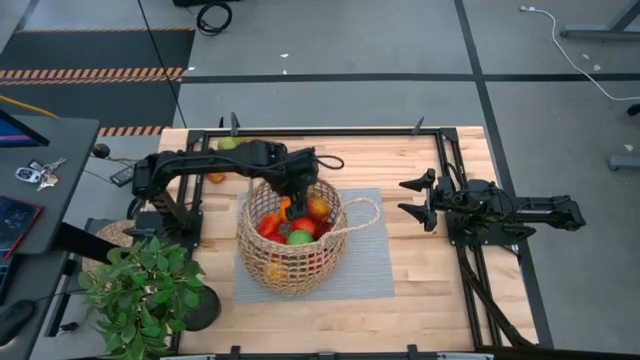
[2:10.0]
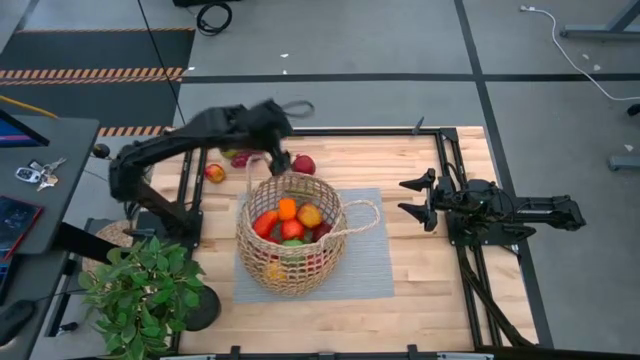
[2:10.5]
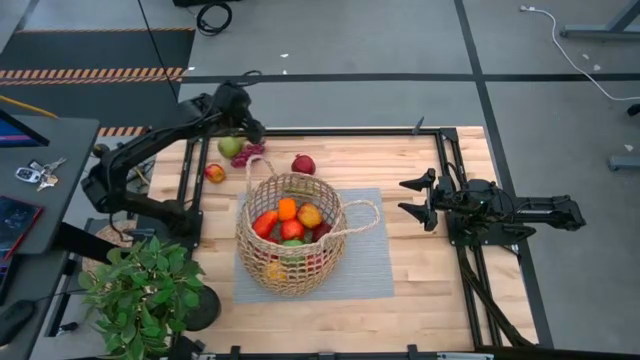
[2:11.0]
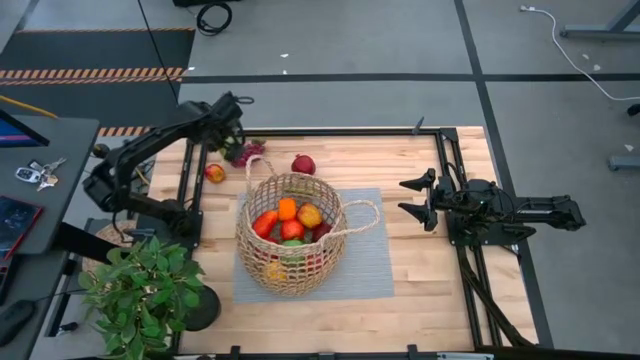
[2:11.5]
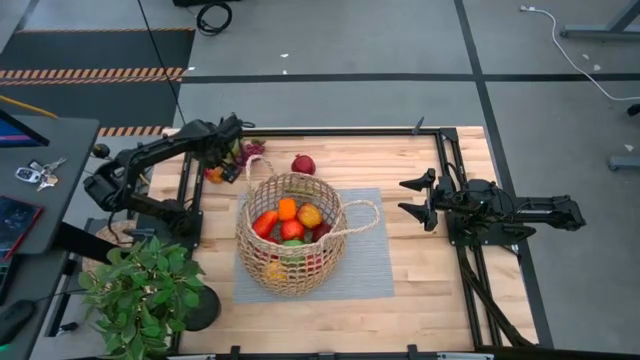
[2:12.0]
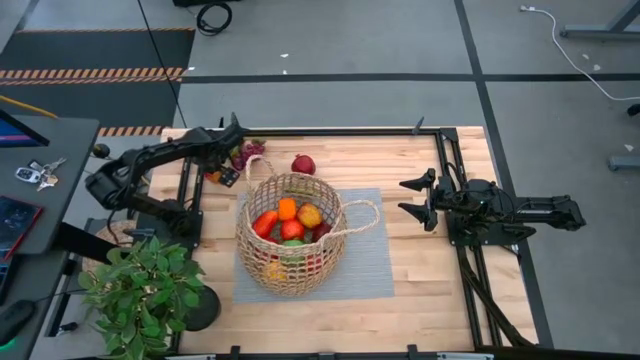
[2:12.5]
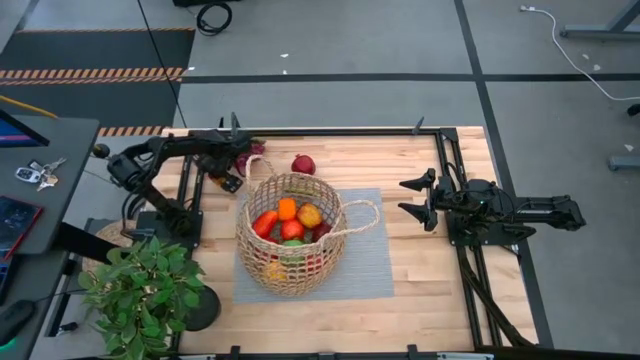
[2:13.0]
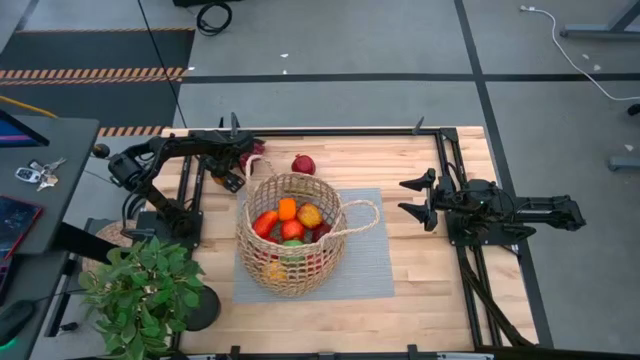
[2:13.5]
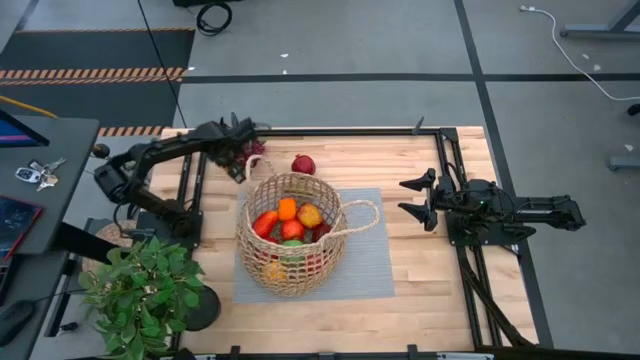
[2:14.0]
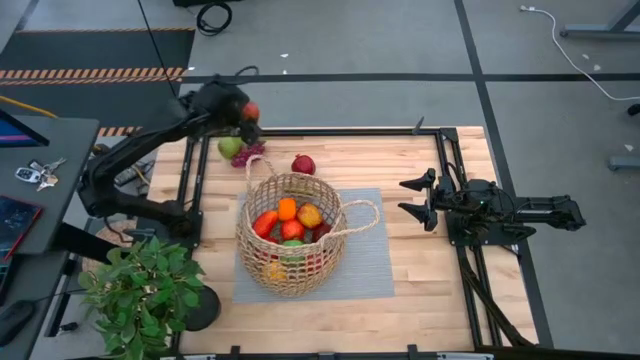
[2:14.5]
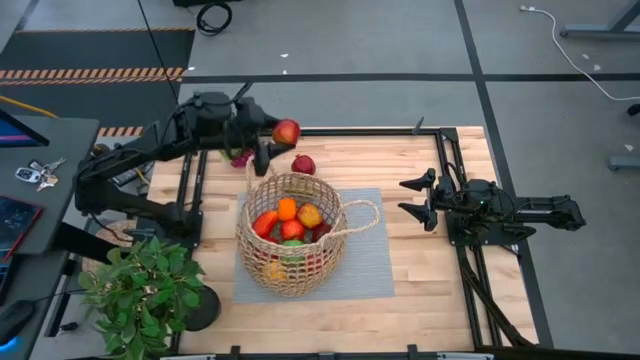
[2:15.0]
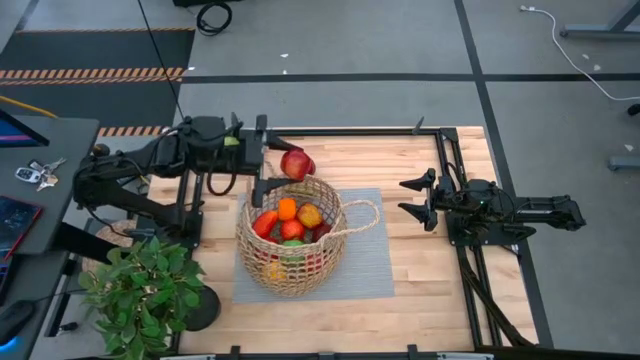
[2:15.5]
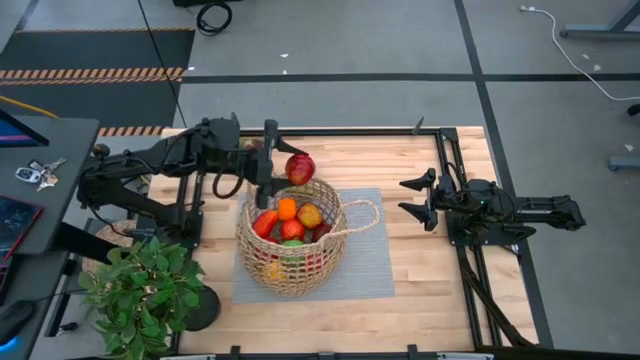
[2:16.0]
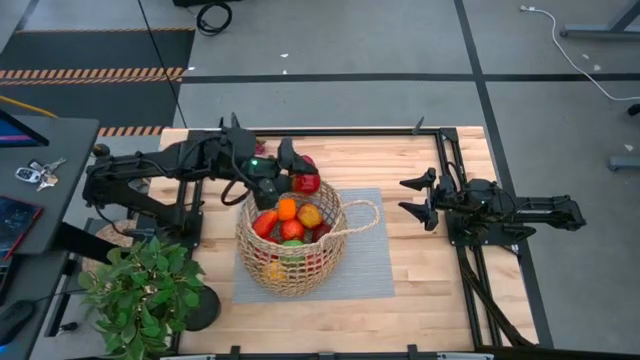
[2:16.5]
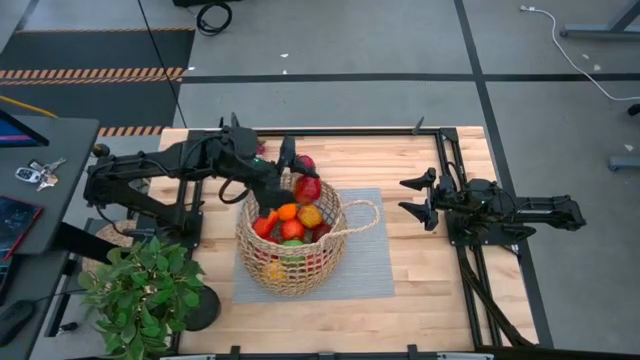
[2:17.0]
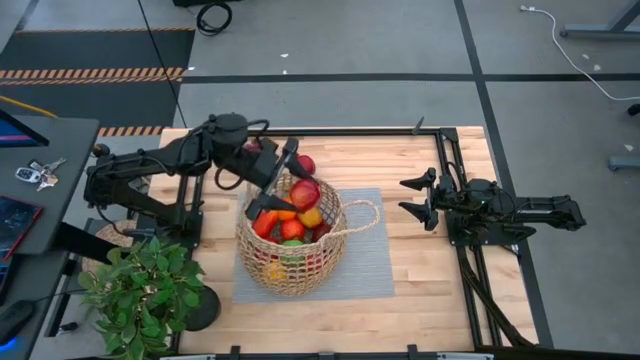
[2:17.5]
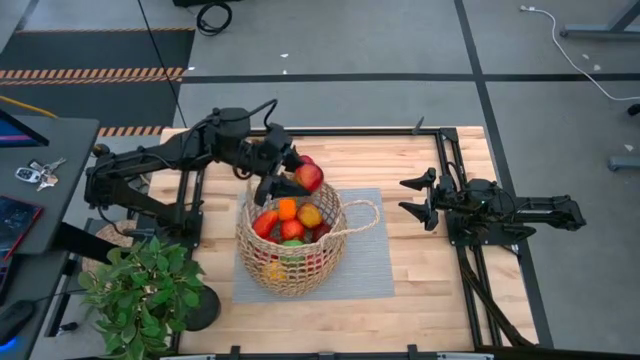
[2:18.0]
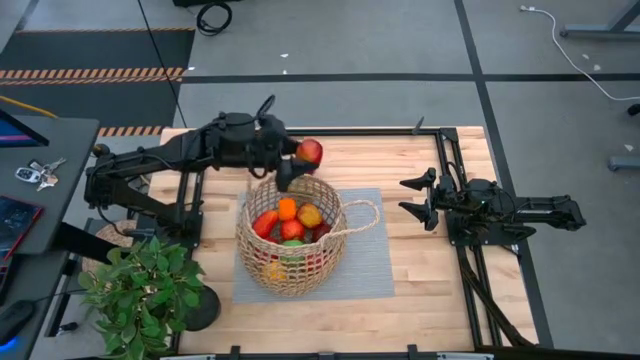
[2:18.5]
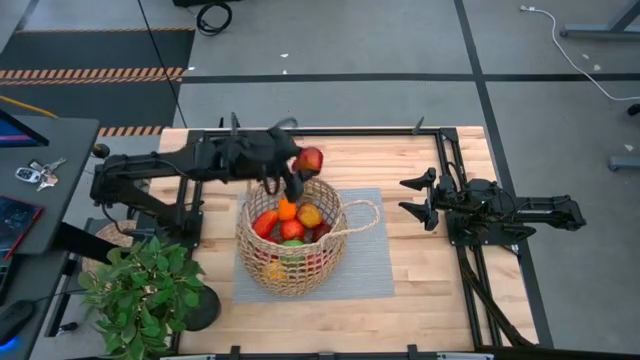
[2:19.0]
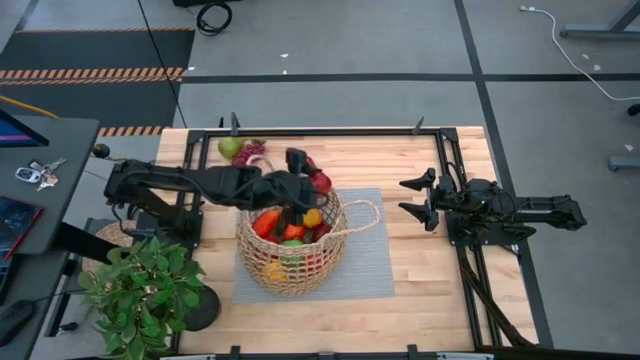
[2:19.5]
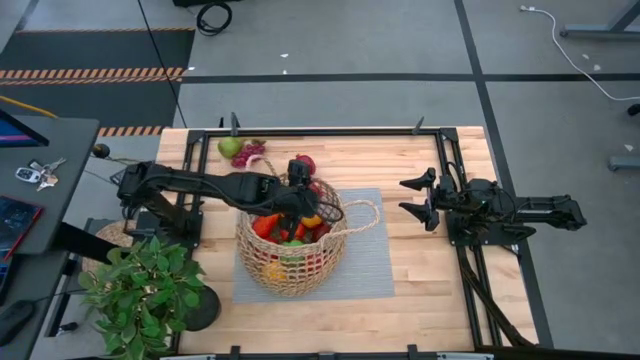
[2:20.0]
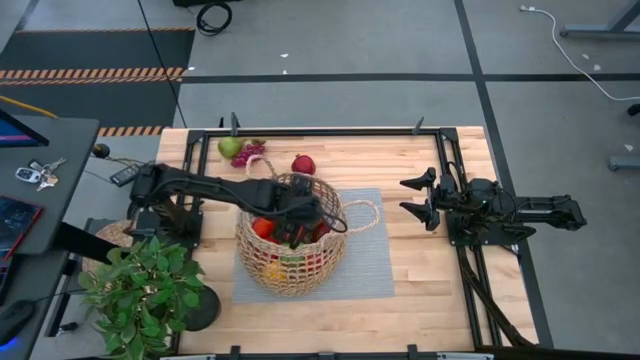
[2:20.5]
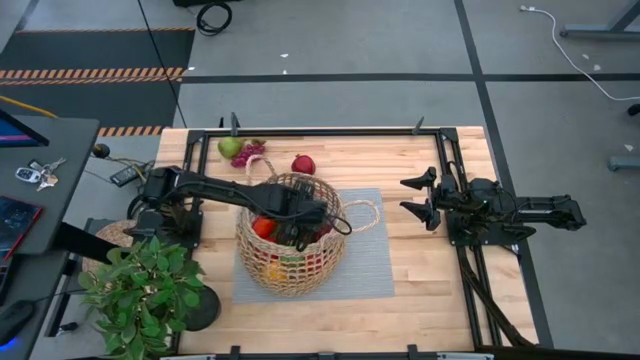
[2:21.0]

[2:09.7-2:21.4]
Task: Build produce basket
Put the red apple into the brown woven basket

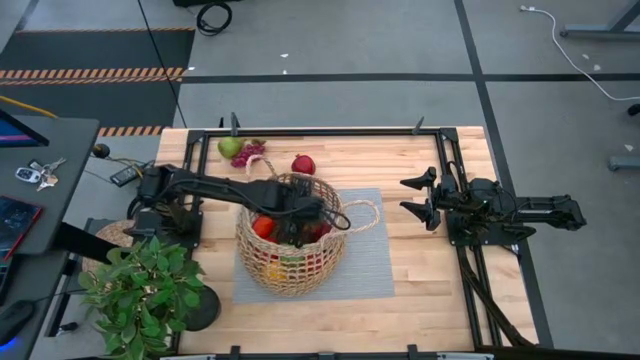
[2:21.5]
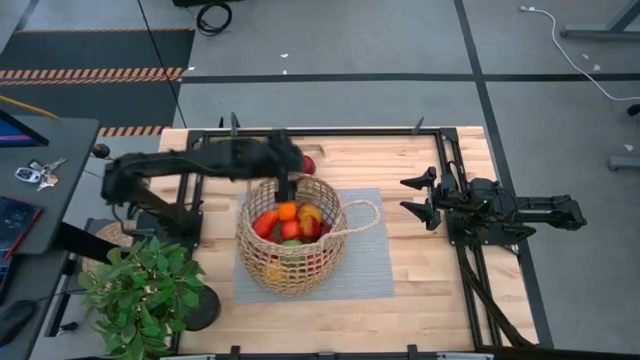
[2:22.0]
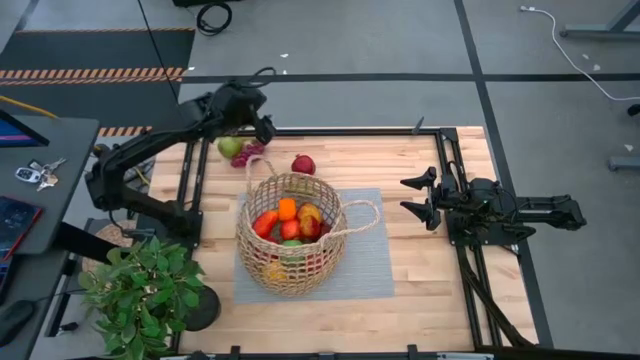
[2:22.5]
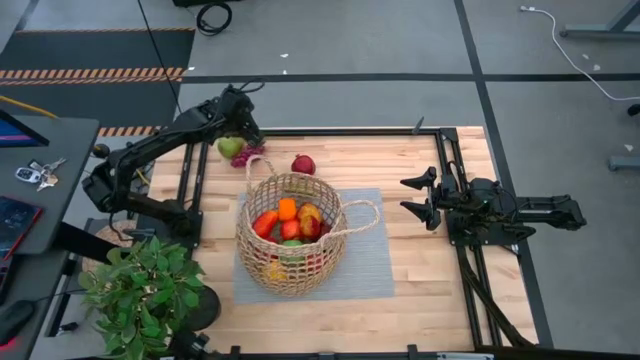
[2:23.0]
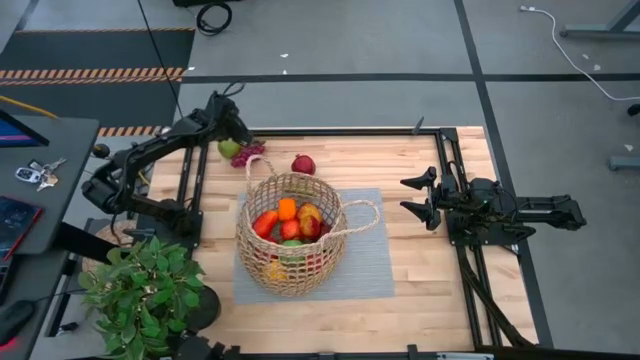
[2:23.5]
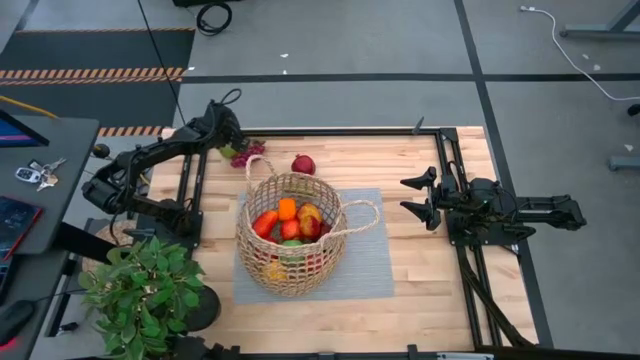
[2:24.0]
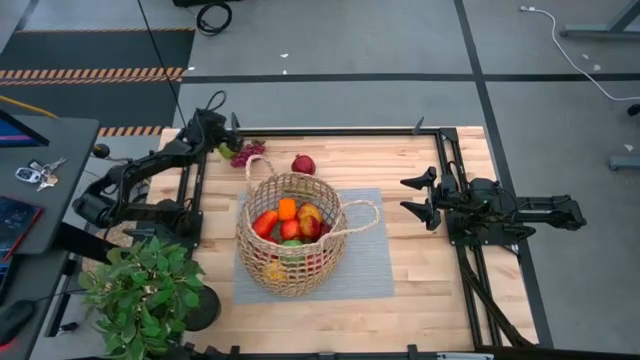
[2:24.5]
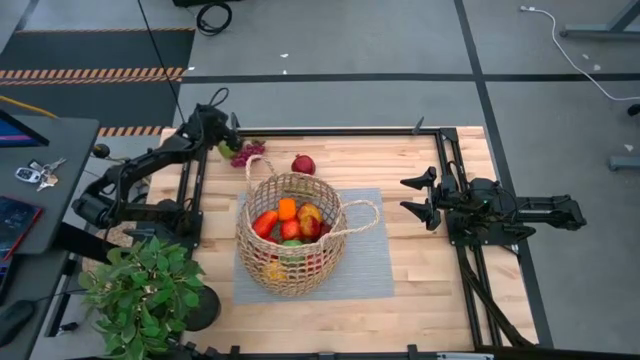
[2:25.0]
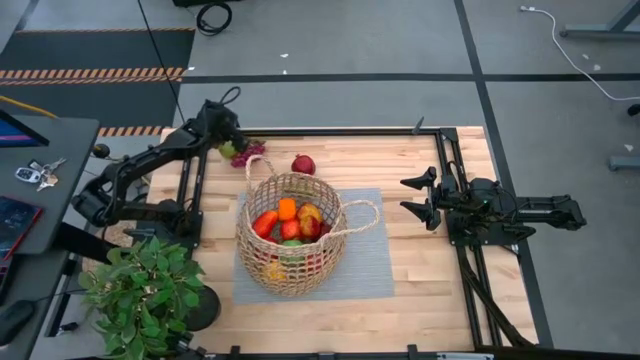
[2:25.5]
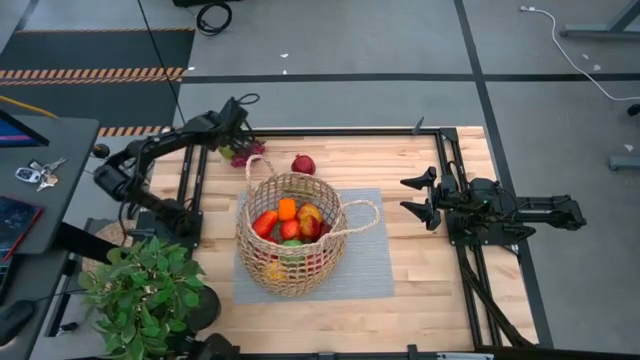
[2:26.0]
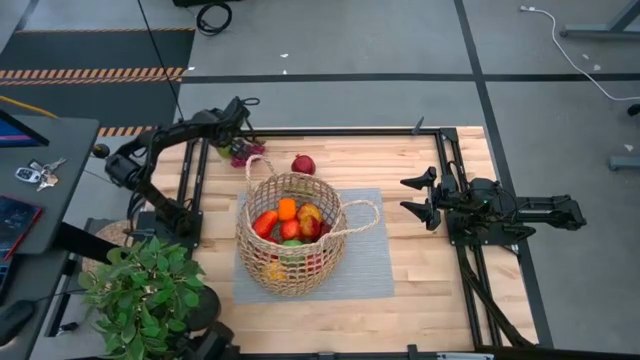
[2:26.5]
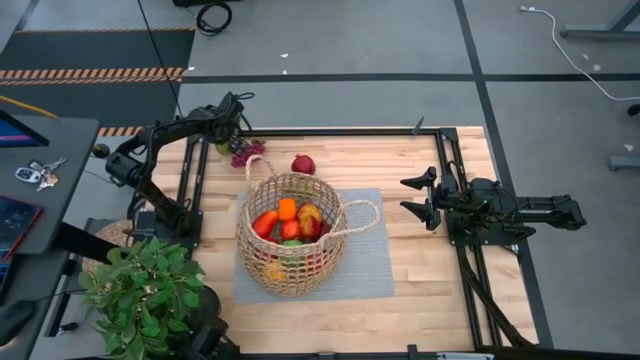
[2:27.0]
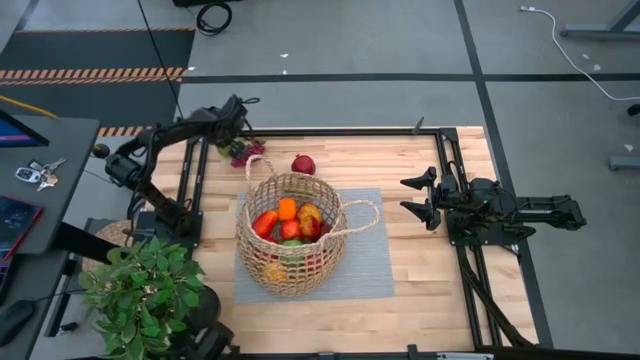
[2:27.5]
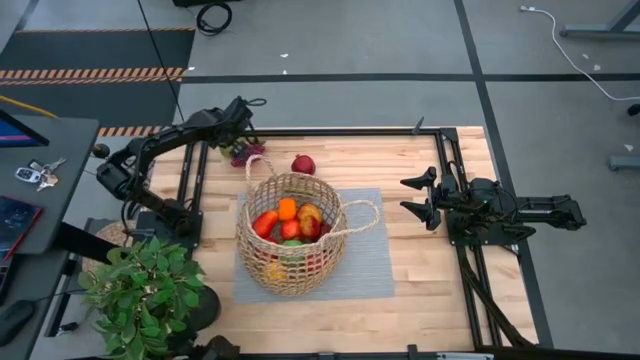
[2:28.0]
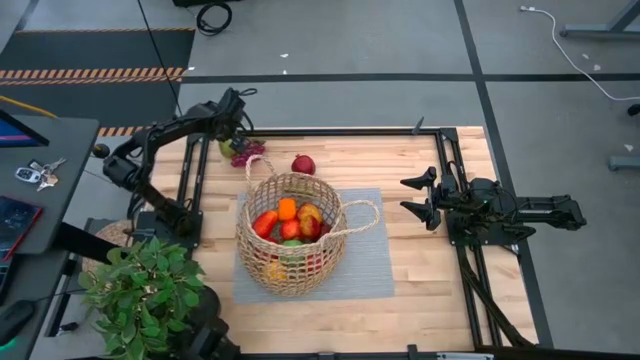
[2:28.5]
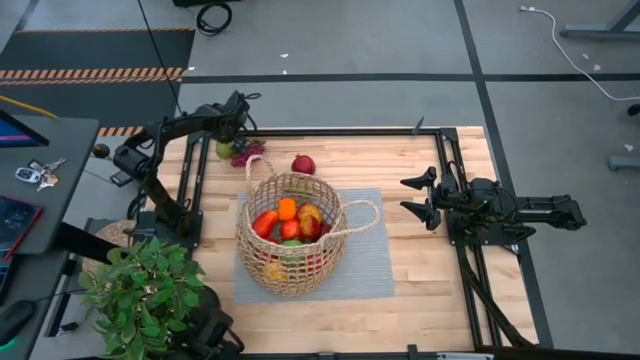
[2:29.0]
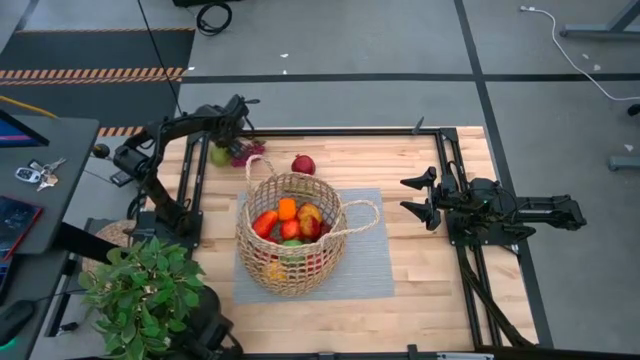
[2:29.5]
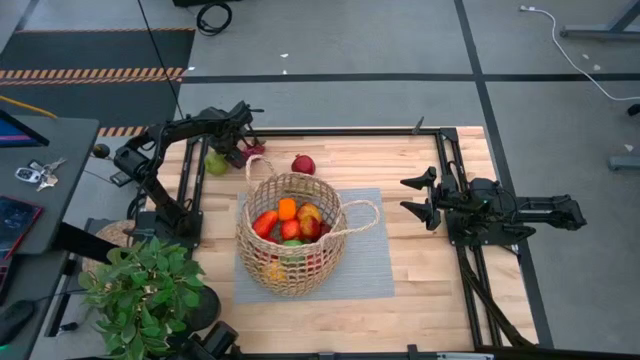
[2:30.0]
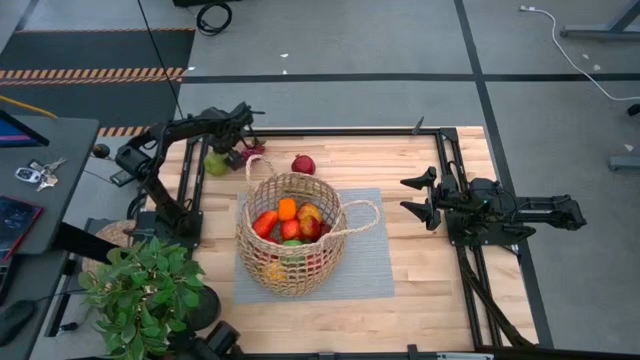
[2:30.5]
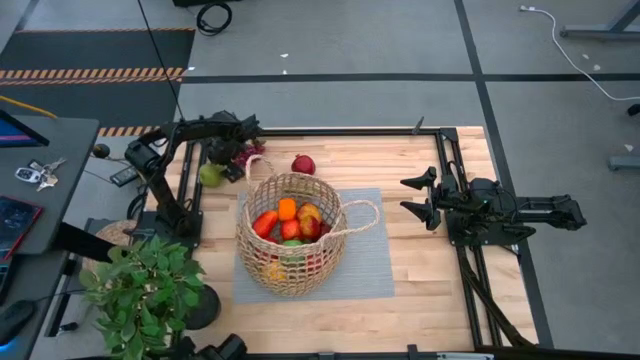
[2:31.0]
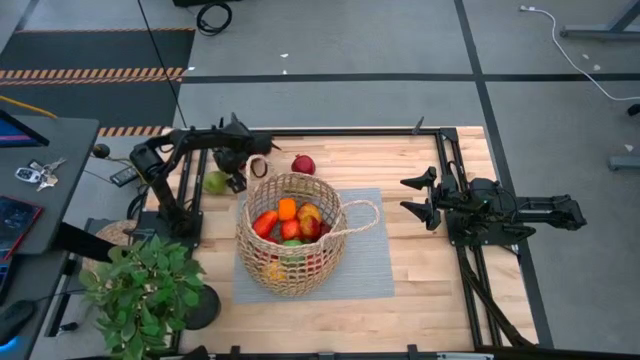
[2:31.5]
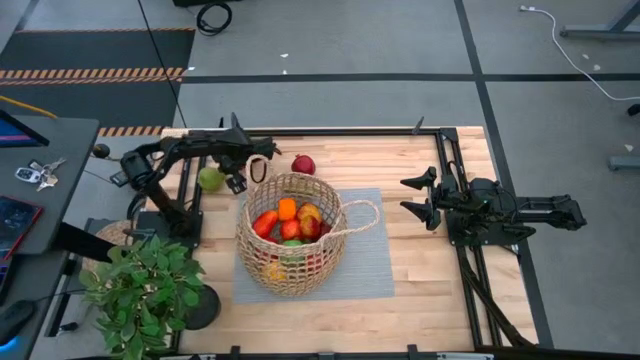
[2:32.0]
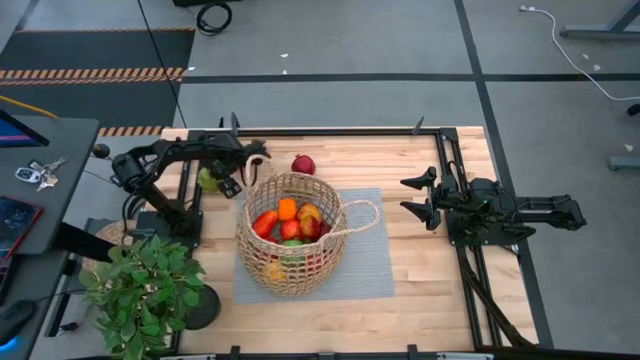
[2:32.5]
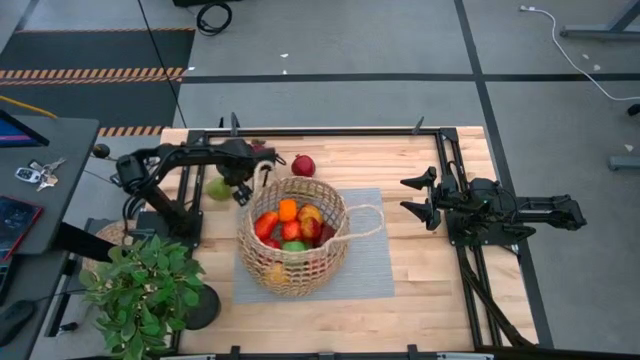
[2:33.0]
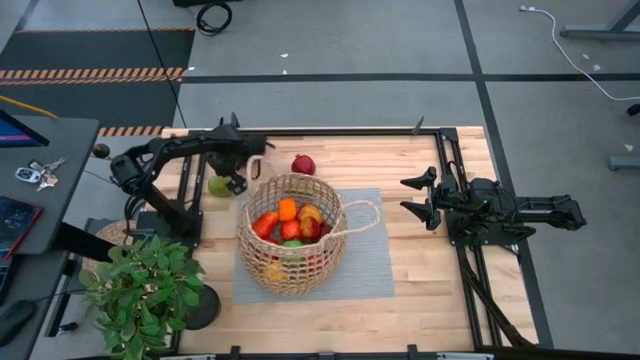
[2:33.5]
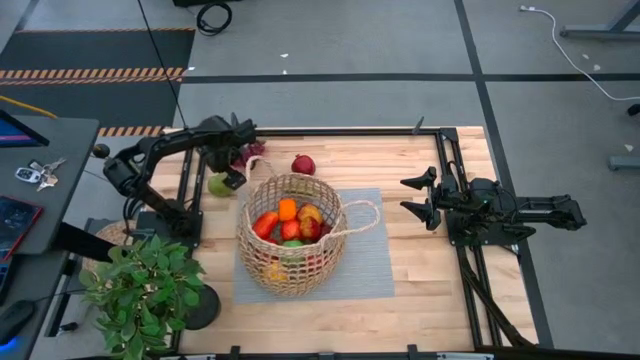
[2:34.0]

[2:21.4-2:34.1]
Put the green pear into the brown woven basket
